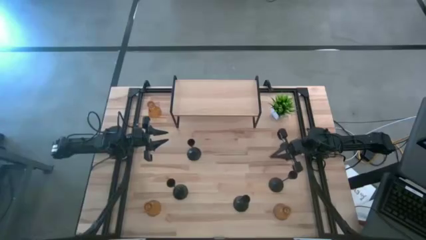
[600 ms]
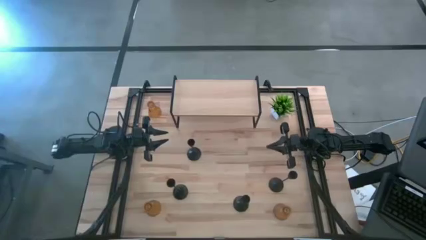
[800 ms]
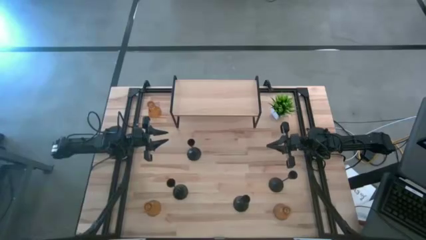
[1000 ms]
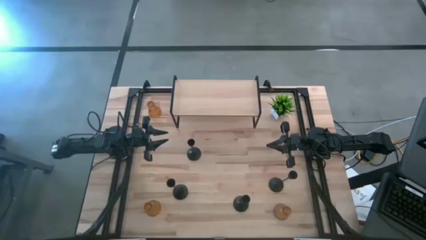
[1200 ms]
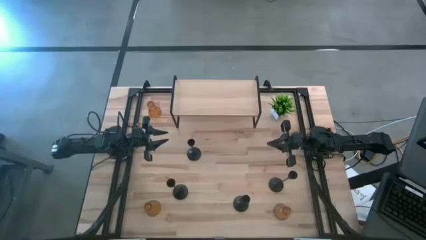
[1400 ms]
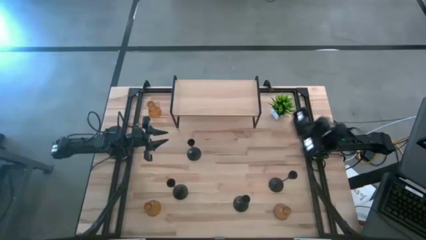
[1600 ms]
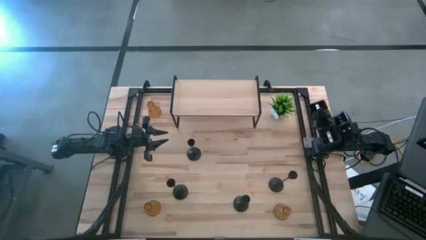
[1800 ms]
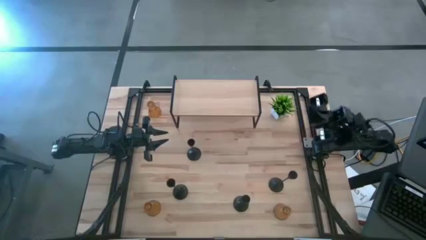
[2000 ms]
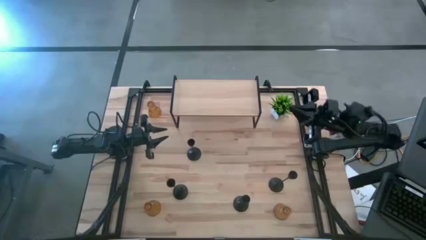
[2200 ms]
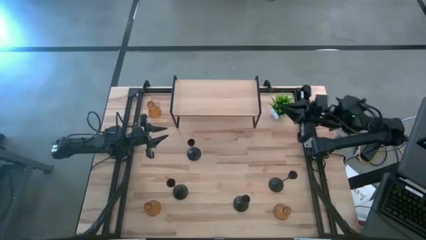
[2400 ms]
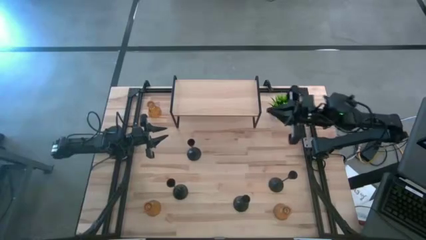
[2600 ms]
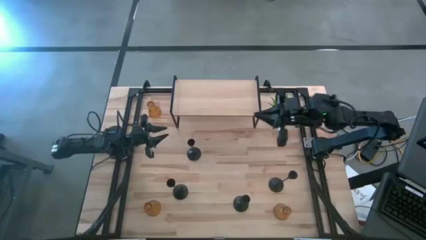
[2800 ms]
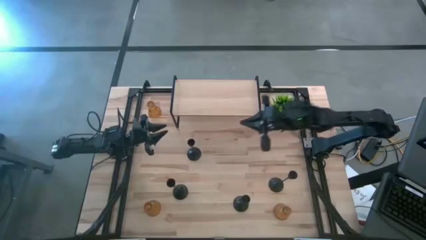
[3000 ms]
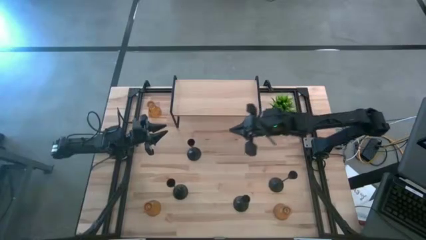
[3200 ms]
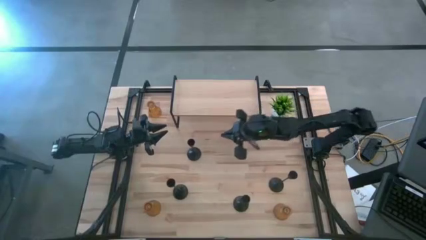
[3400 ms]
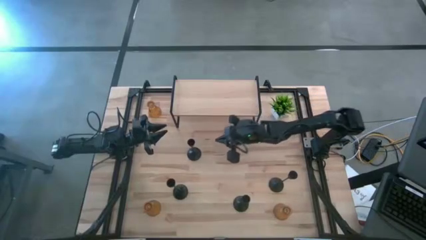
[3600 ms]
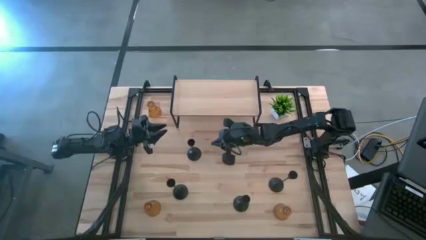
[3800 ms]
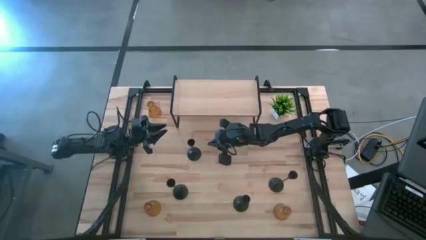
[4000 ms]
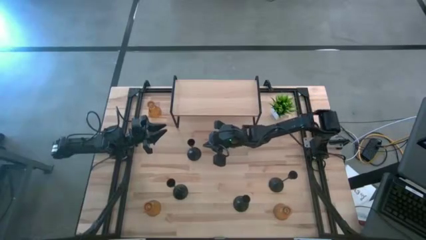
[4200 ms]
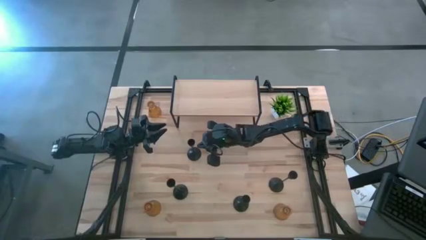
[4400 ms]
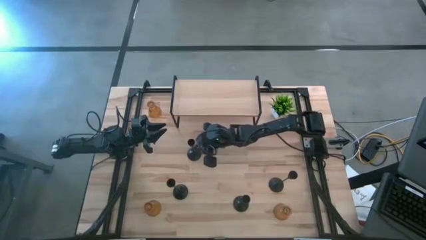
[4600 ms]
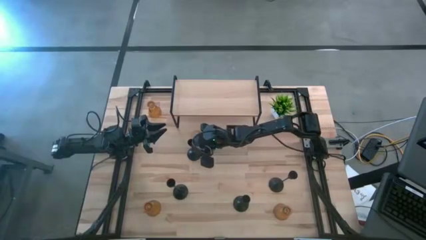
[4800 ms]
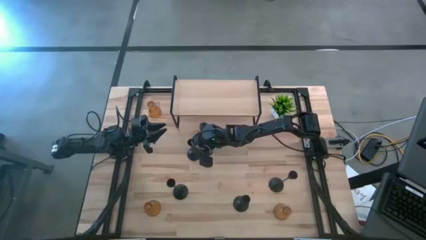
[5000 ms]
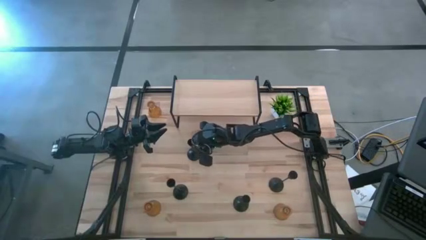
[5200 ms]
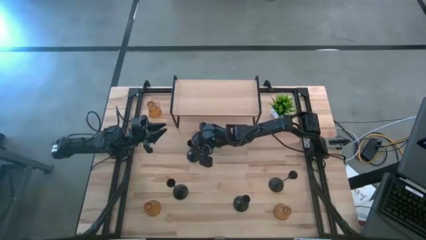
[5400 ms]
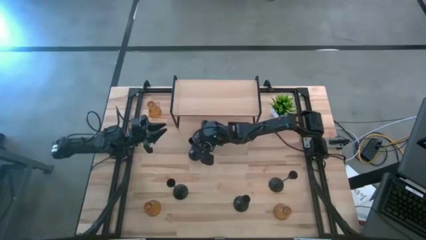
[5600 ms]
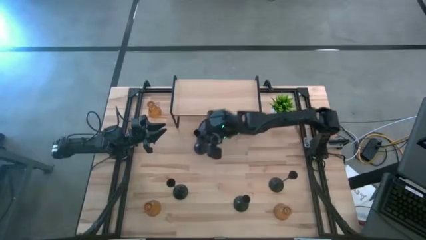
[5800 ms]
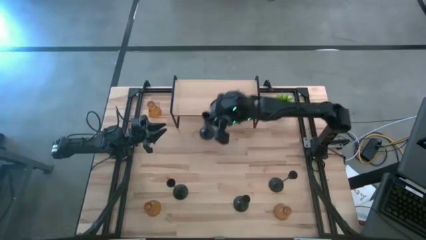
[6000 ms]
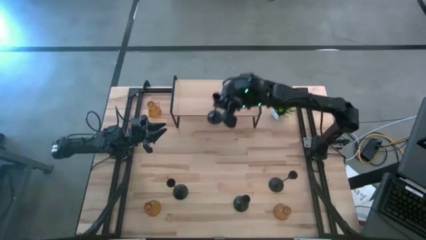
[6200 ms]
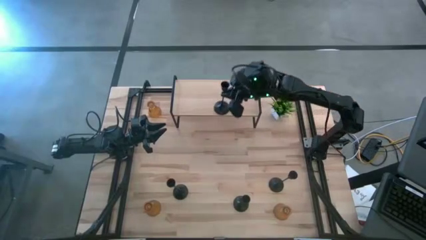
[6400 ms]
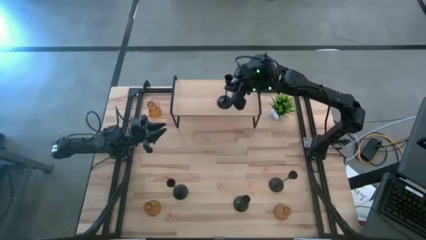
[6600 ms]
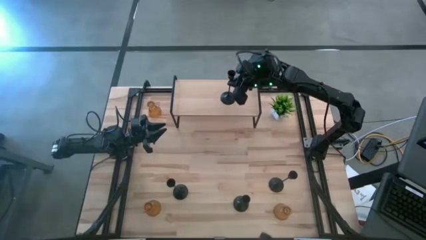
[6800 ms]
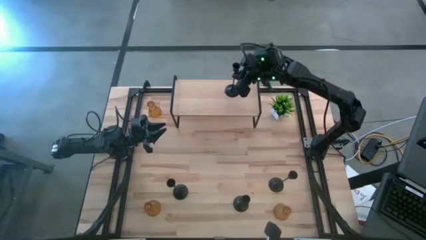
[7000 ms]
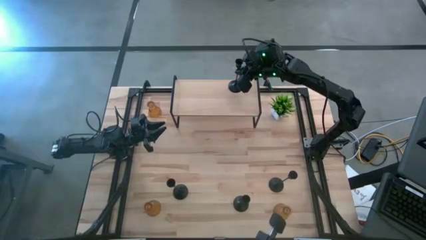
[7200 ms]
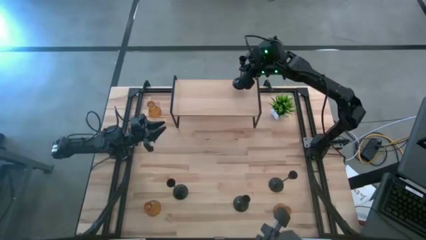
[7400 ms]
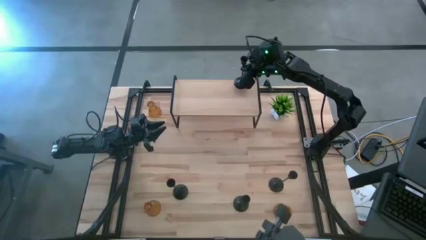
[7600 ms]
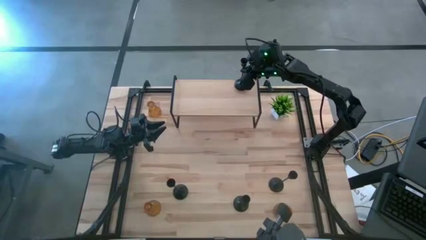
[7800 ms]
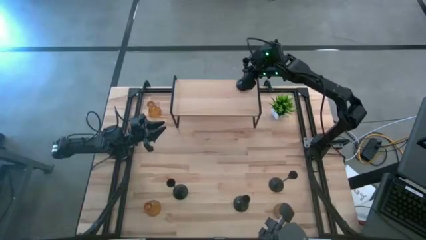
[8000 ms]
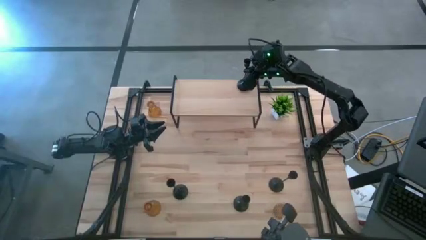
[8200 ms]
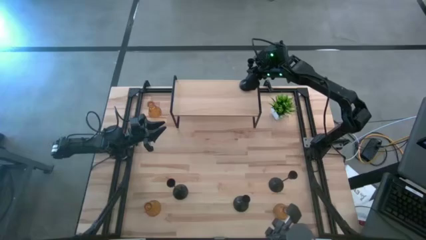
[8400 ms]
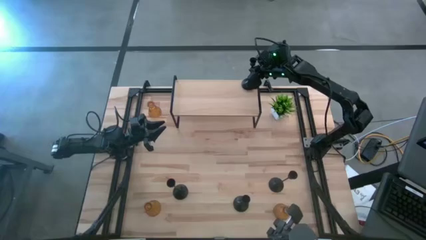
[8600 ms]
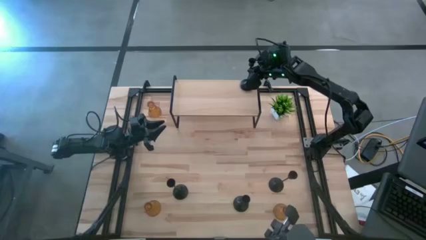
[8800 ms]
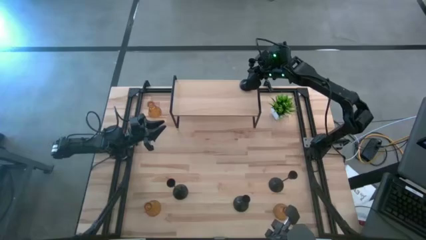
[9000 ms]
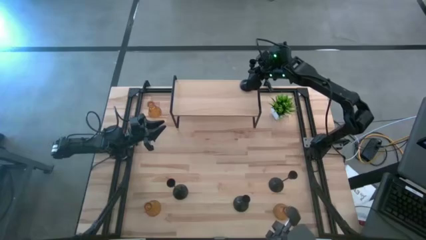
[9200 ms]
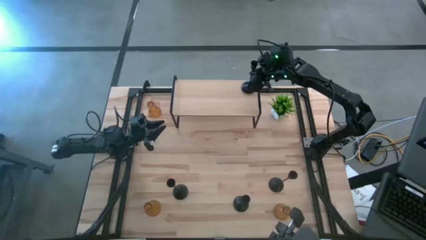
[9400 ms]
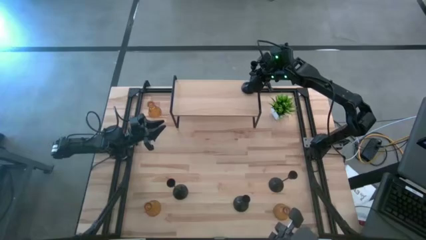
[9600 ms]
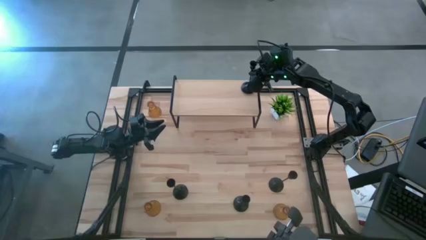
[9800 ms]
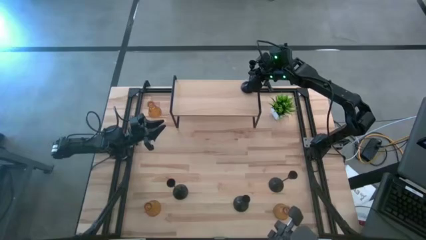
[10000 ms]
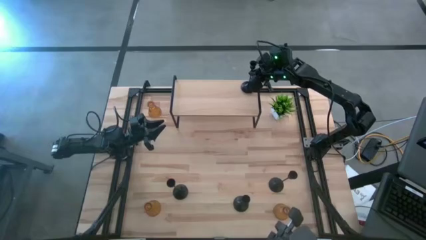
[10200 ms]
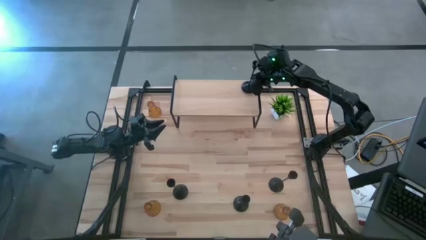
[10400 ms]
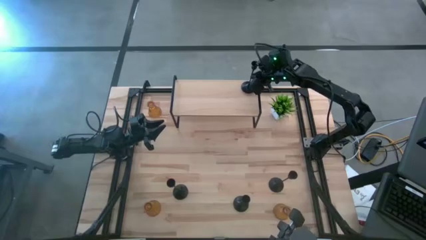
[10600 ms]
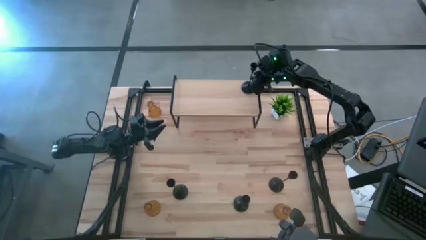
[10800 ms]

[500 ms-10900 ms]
Task: Pick & Place candle stick holders
Put the black candle holder on the shelf

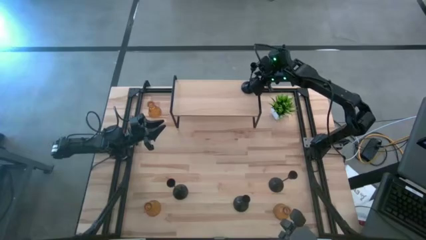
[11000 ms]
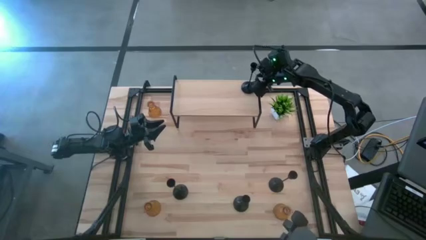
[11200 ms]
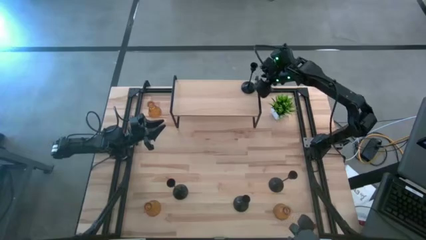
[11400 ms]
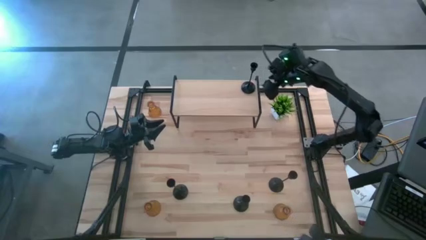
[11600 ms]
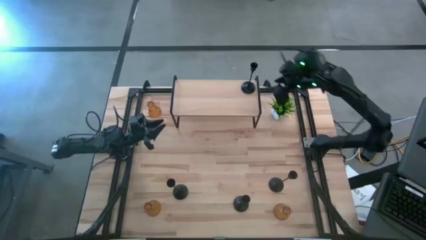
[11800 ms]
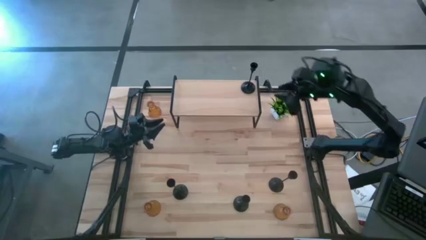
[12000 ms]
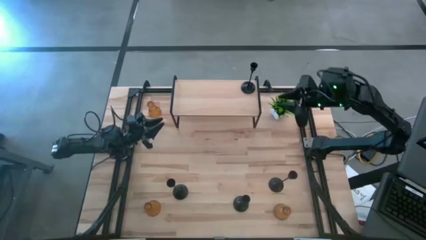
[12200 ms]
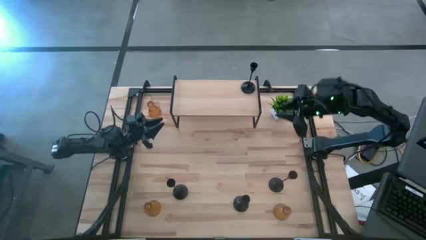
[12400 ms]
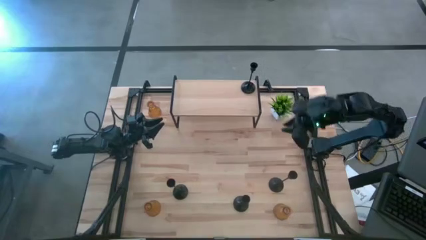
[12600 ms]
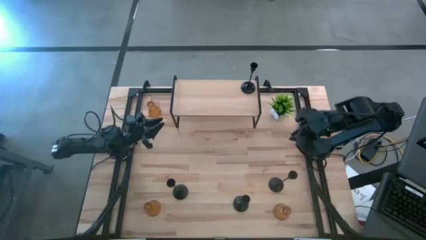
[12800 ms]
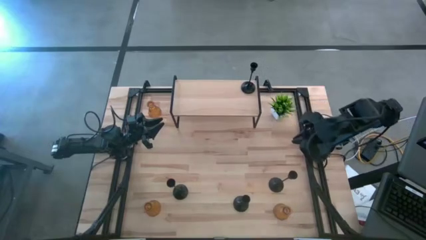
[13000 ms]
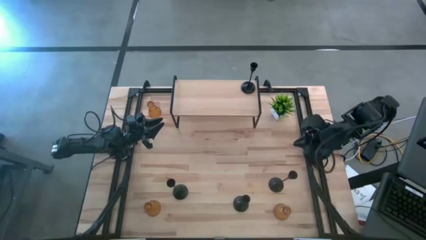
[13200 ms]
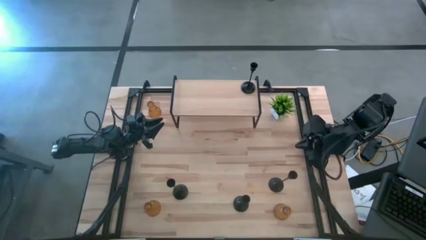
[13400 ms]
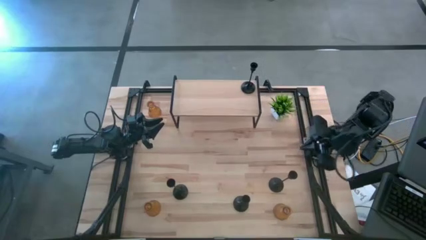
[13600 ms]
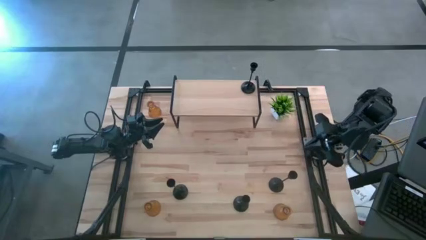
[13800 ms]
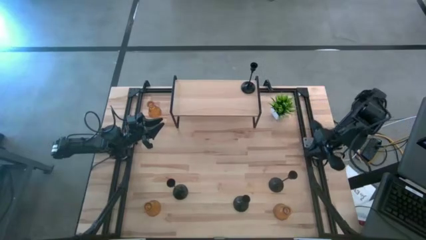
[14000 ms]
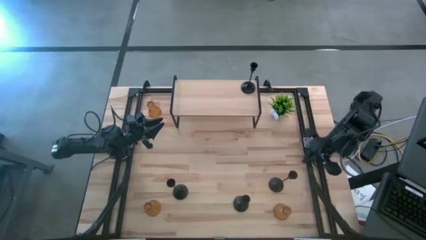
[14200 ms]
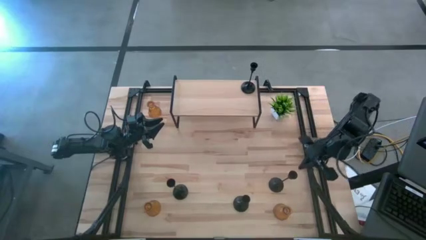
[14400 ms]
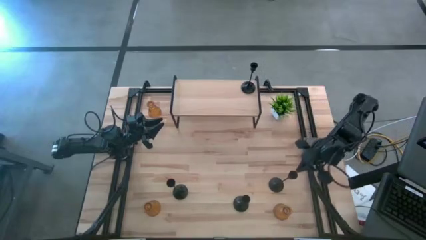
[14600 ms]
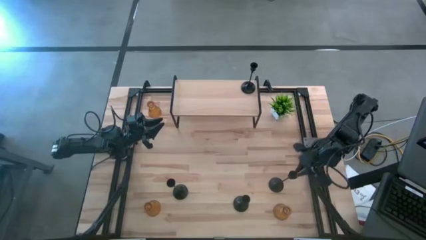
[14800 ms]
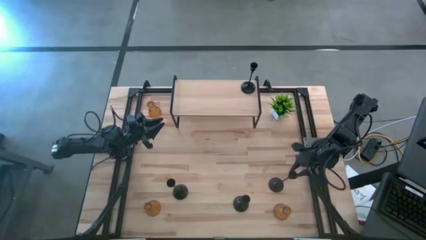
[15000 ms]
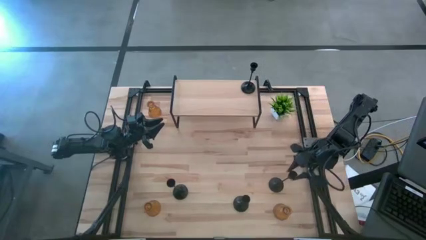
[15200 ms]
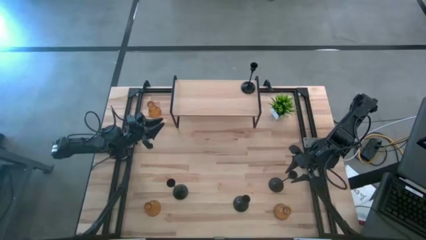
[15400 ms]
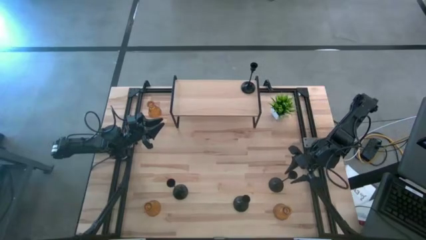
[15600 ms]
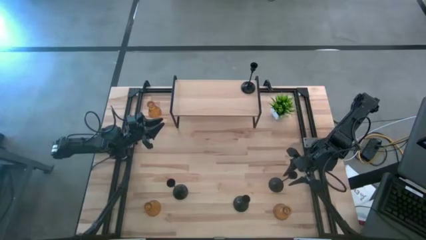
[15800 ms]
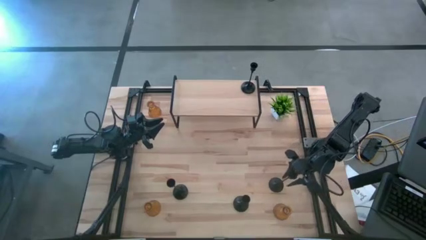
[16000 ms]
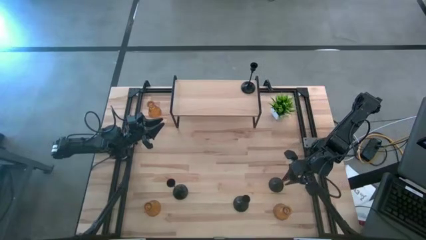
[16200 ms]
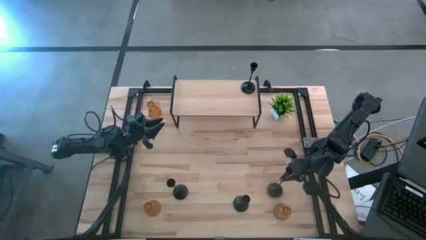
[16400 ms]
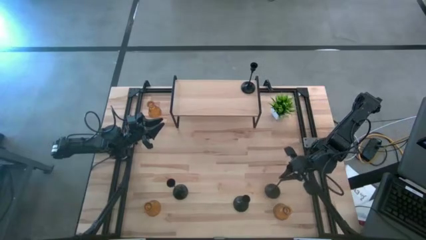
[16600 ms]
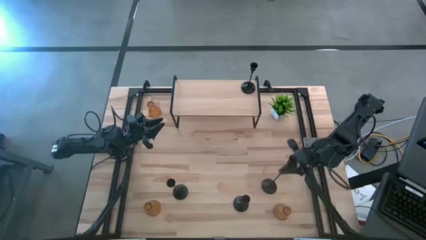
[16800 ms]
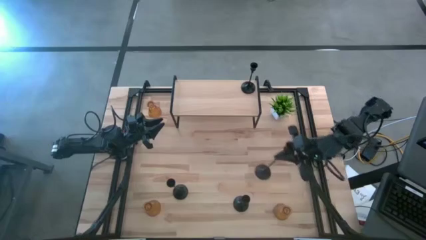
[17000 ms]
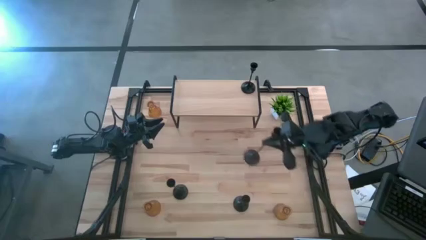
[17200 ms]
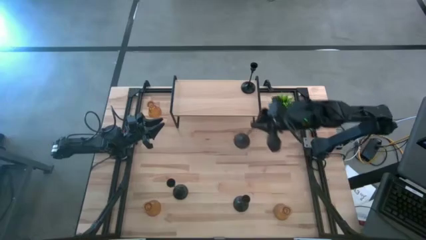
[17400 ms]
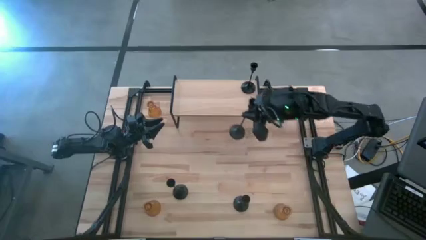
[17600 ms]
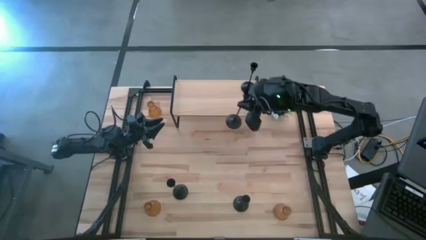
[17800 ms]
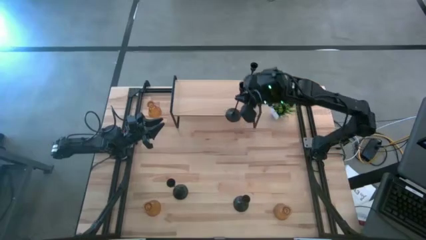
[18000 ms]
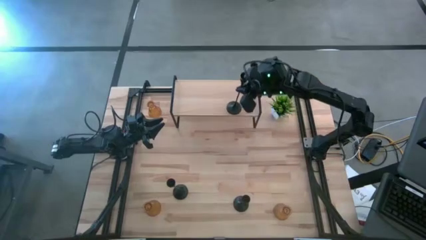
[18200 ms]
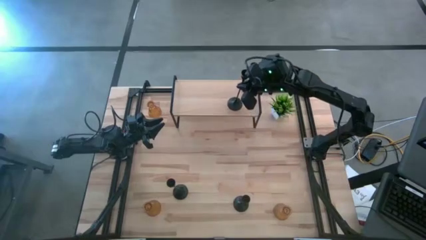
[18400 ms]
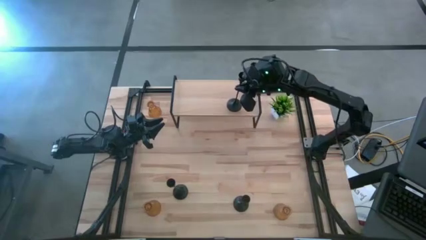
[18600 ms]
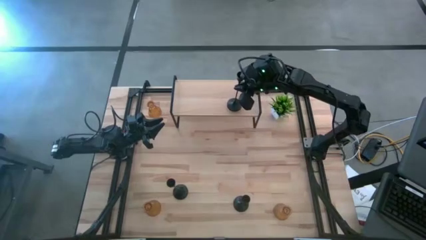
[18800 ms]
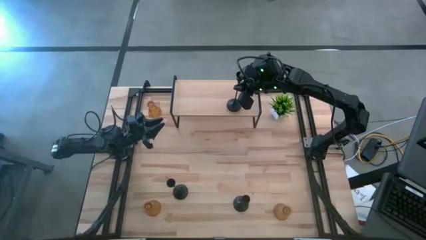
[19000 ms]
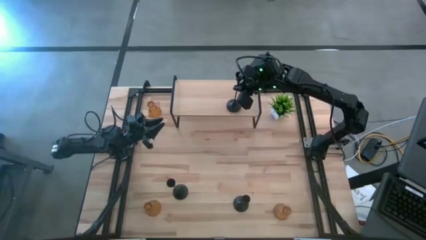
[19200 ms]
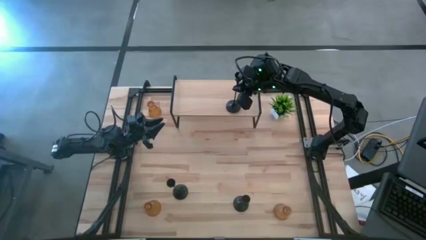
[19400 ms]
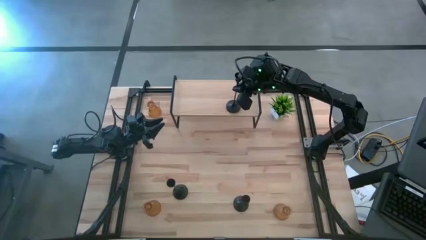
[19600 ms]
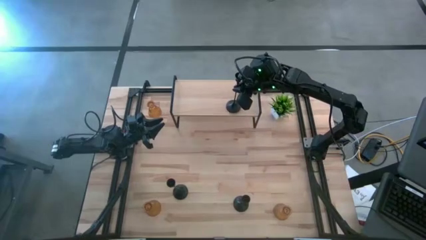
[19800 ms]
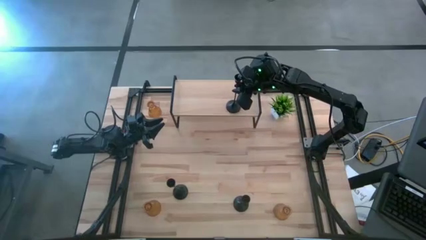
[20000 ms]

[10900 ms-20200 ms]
Put the black candle holder on the shelf
